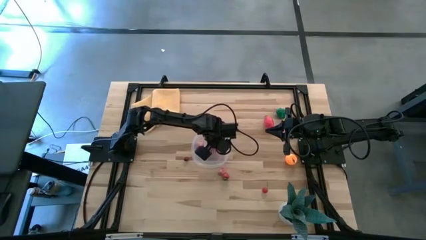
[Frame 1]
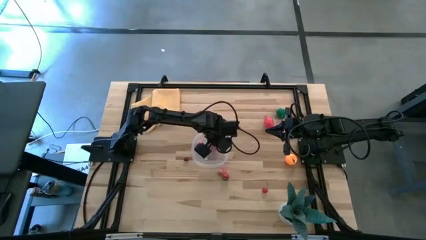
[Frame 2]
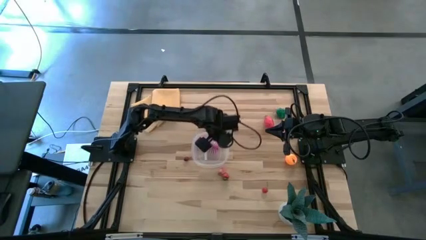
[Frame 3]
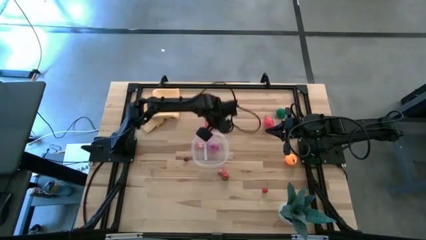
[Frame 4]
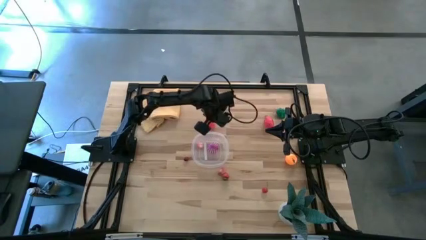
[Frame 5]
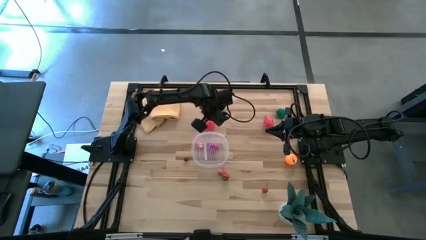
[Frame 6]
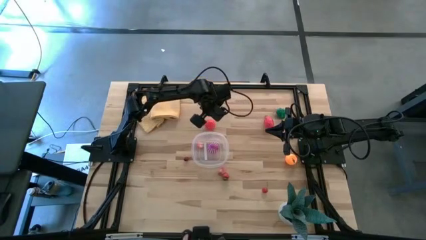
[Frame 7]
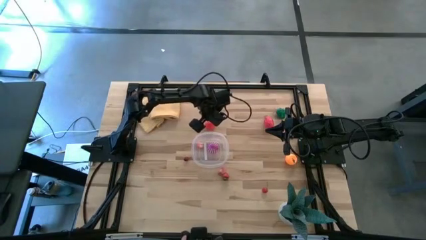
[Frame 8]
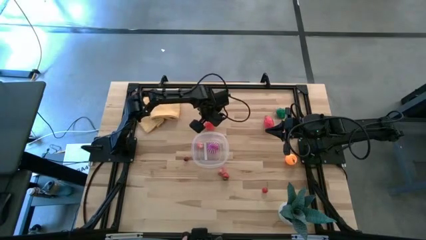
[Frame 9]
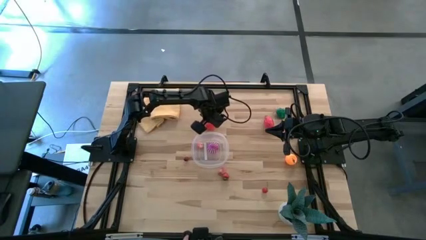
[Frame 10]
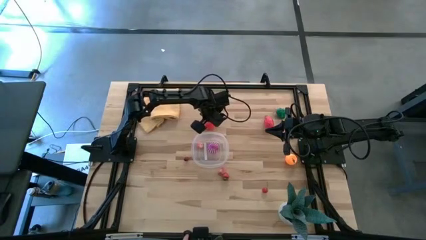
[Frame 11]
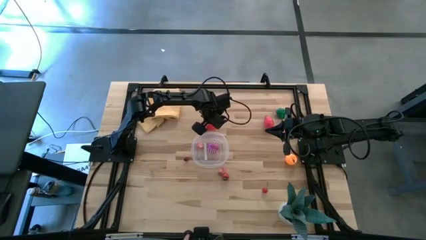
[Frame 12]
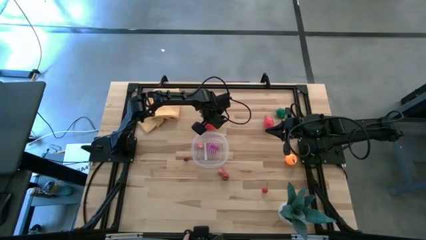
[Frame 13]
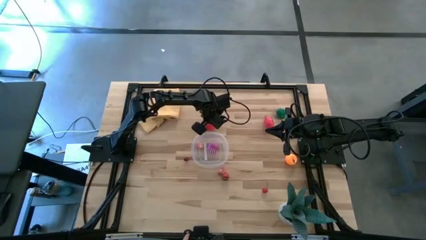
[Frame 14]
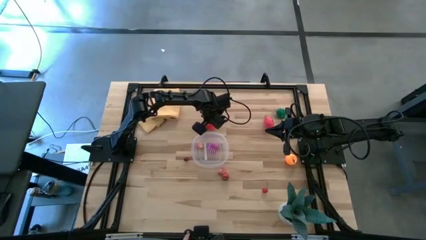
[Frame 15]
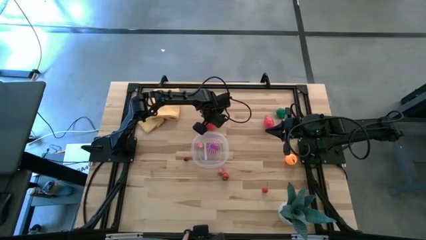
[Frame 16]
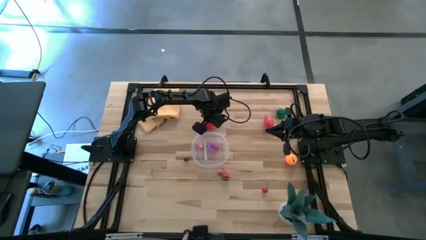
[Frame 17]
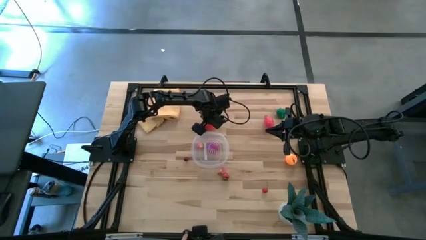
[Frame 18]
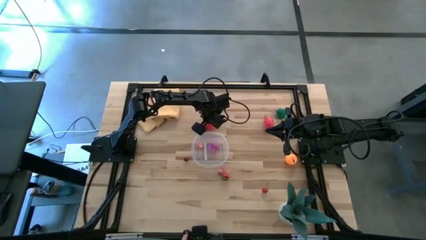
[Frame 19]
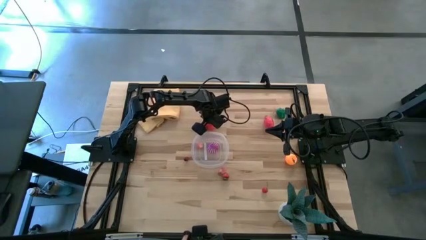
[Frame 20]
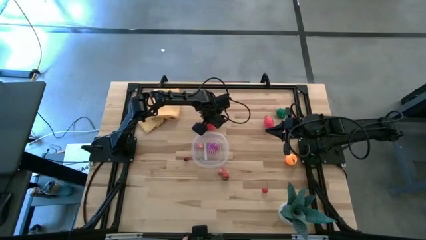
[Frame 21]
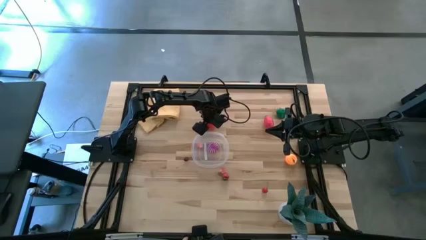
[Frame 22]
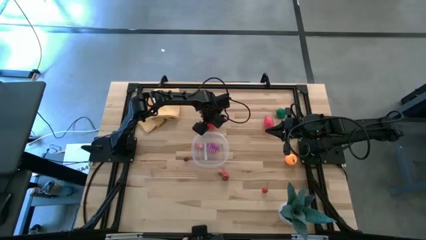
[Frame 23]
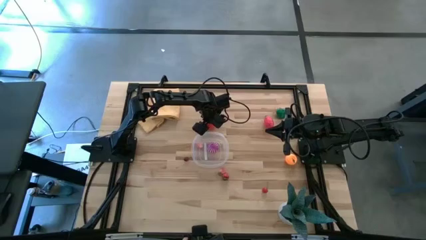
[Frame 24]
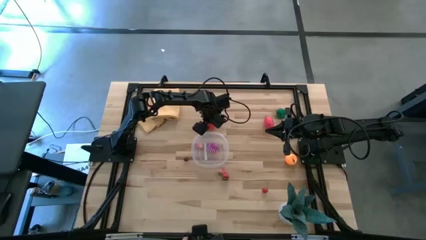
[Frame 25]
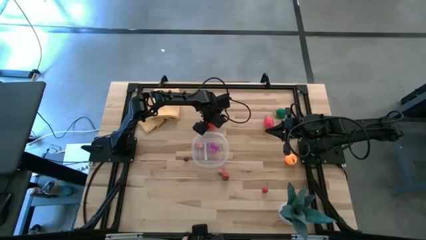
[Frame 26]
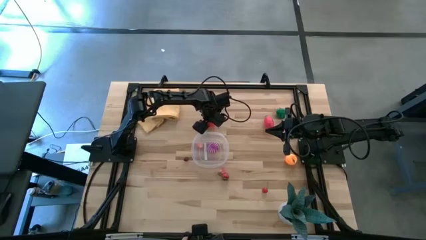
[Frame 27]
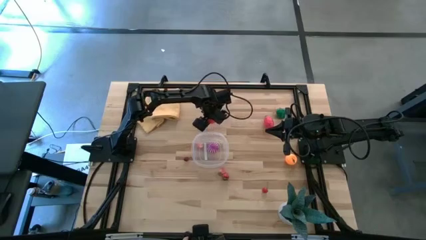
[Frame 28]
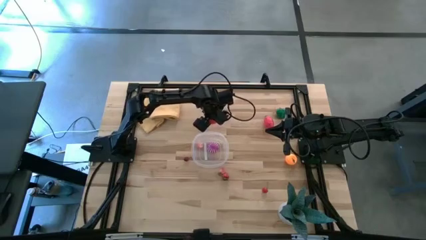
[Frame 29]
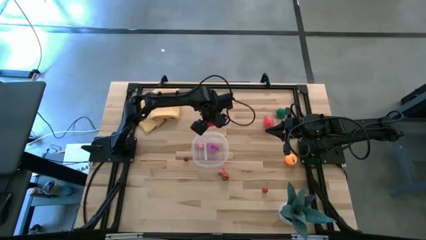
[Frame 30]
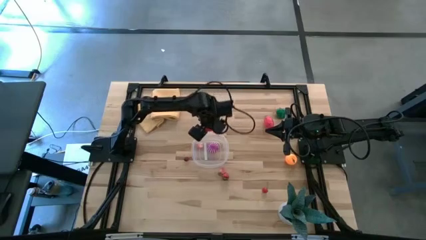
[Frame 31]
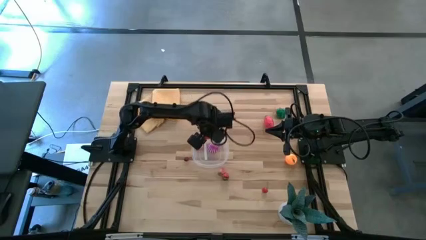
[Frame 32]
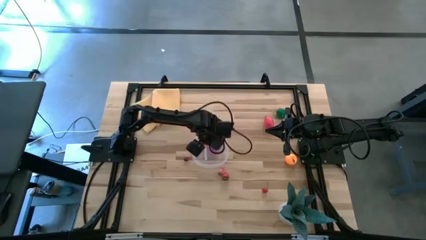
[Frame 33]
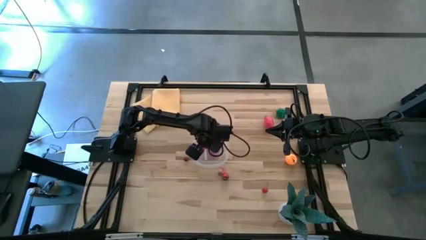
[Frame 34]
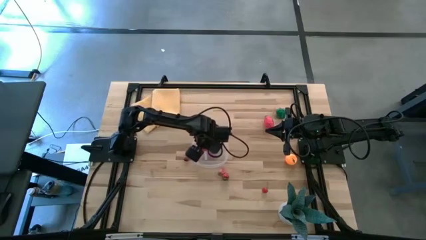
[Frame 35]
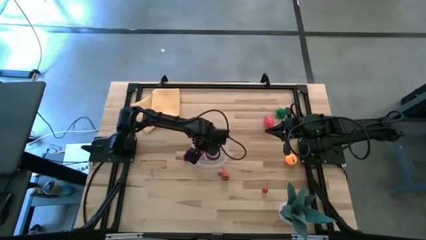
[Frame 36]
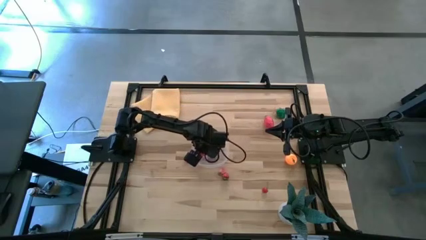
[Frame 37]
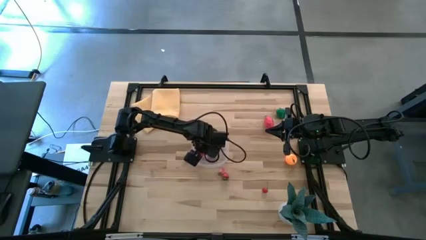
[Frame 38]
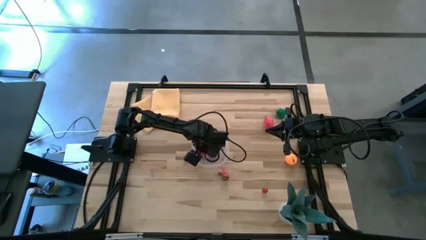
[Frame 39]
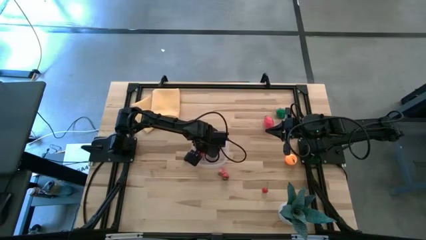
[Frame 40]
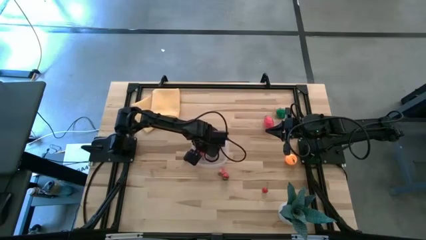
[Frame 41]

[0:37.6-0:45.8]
Task: Pick and placing Produce into tupperware
Put the tomato into the transparent bin

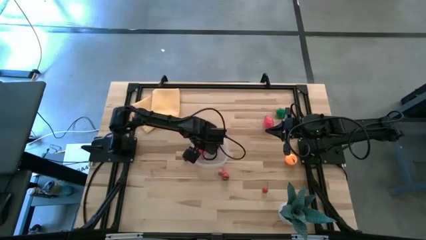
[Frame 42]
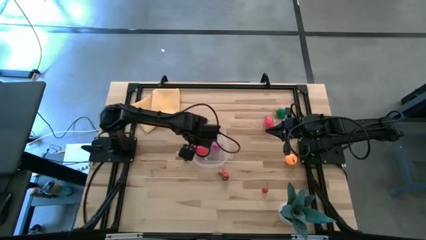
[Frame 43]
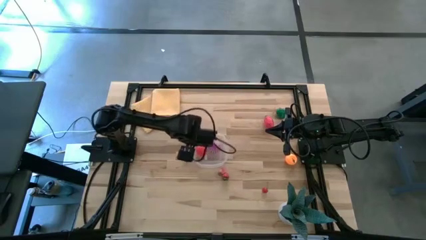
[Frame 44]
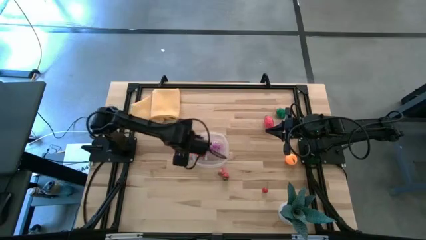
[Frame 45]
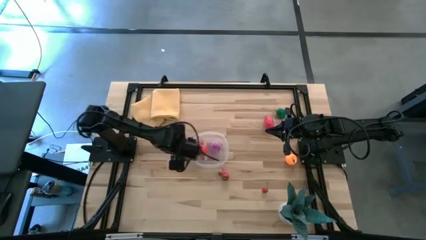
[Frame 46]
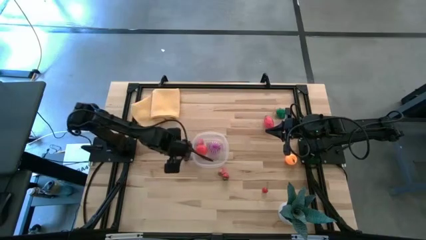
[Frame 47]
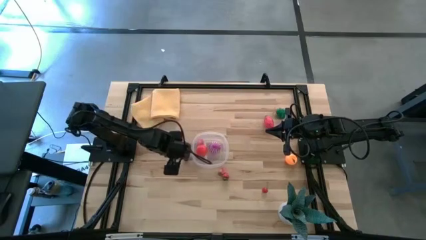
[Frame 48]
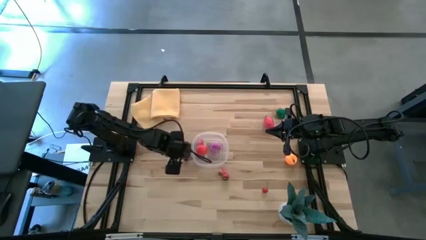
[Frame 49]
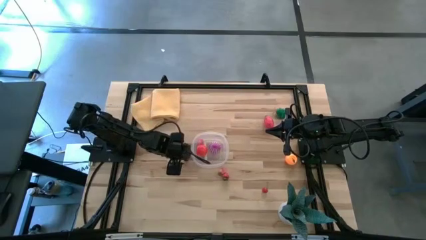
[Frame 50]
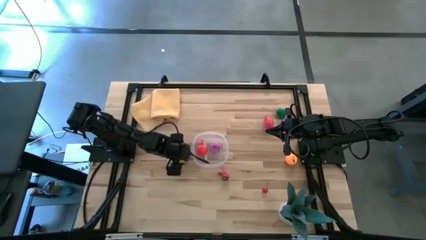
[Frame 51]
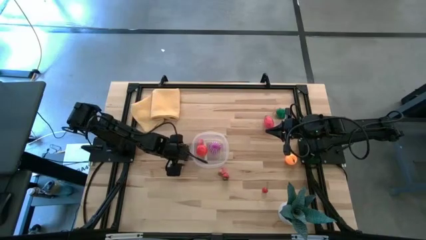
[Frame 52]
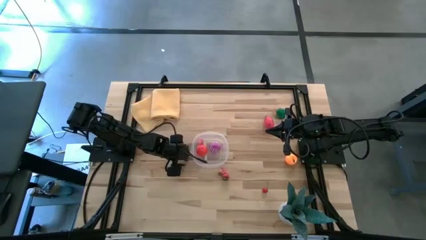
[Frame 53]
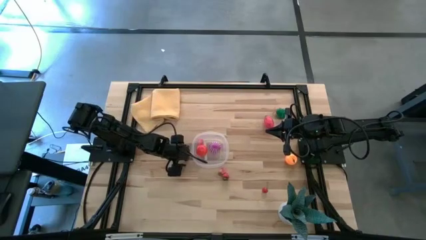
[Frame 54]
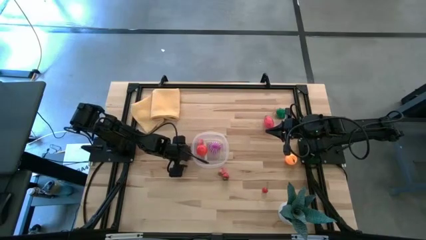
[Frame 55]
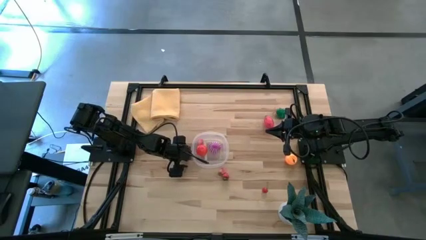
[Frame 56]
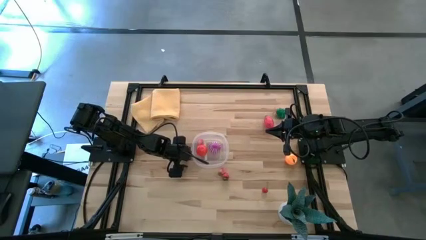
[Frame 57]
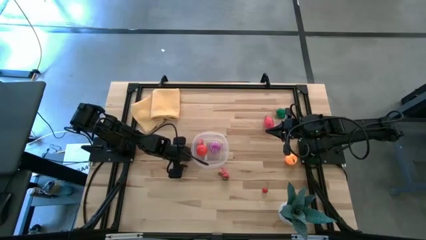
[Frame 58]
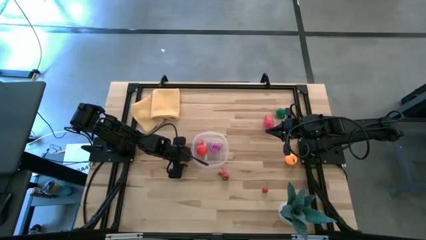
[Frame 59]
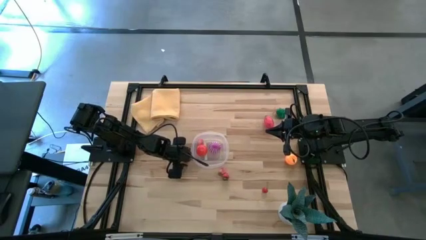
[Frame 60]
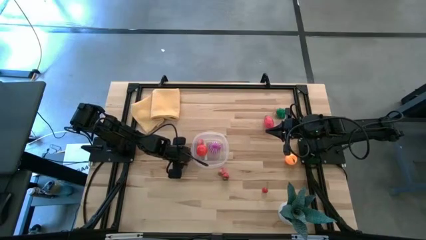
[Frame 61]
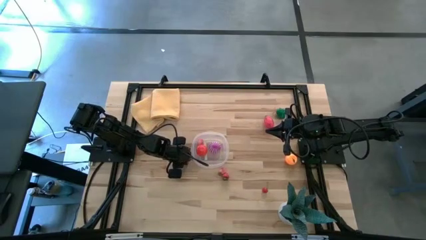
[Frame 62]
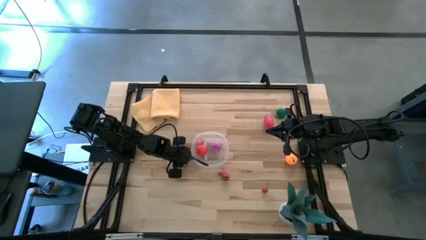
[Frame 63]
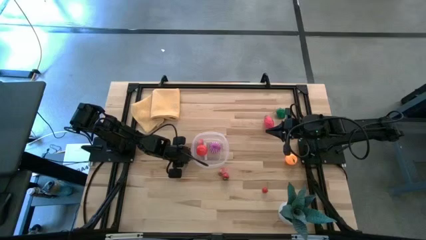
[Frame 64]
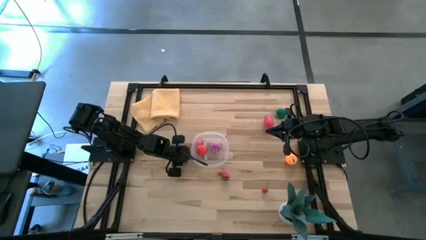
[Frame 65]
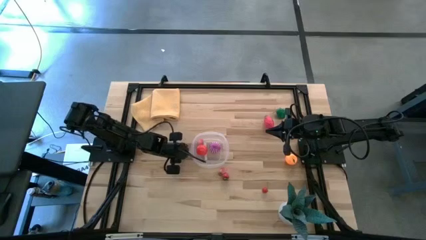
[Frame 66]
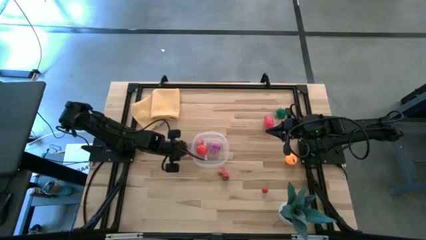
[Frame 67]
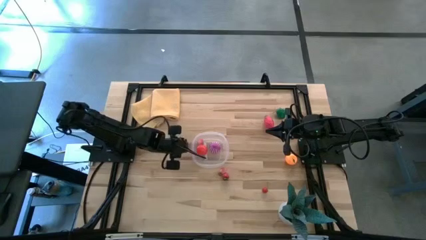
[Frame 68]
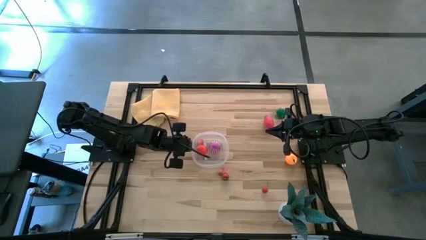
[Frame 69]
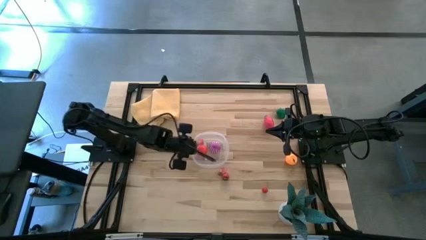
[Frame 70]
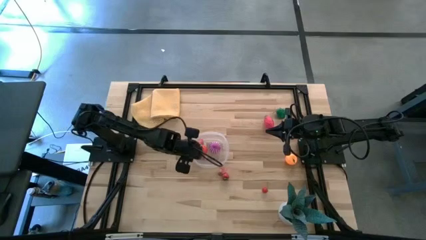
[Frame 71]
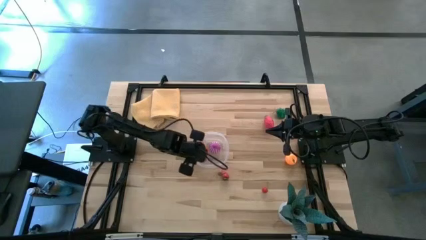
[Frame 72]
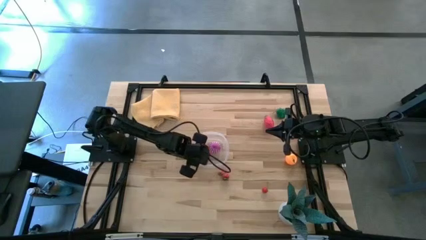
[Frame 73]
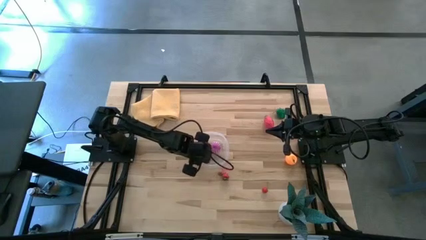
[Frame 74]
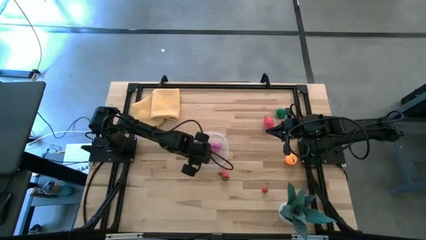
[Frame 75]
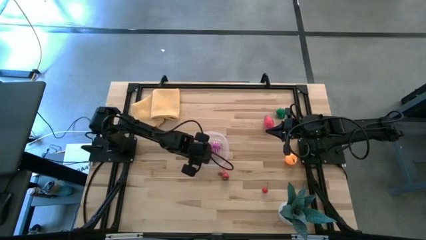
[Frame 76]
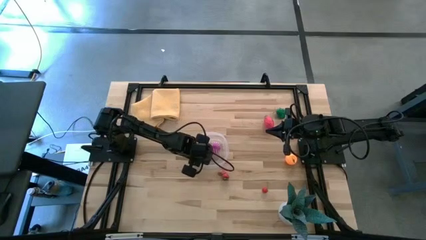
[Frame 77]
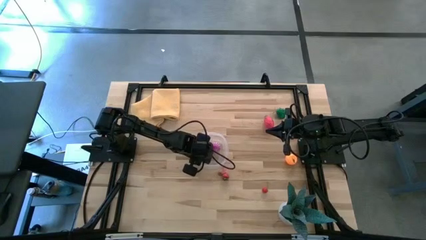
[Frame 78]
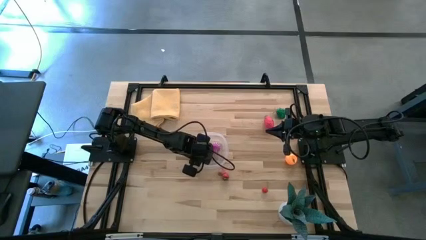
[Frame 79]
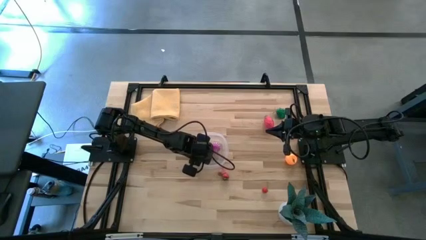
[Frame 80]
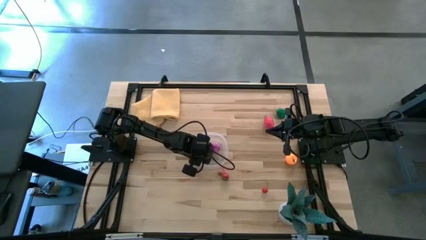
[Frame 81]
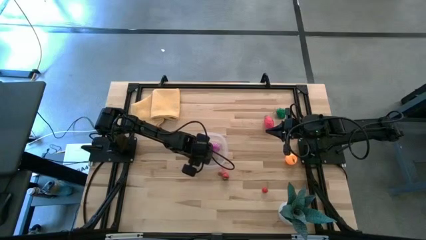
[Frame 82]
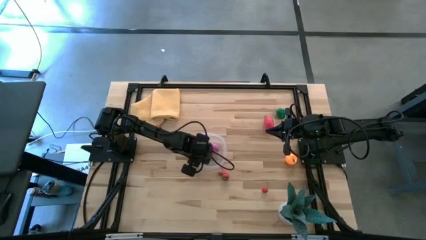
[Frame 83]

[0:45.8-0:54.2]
Put the left cherry into the transparent bin
